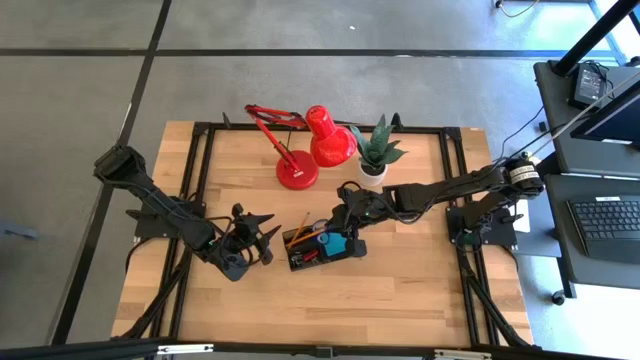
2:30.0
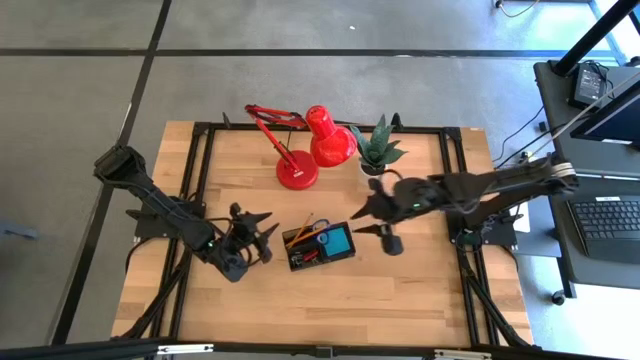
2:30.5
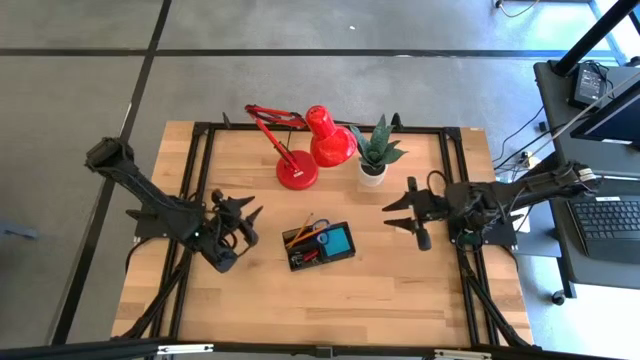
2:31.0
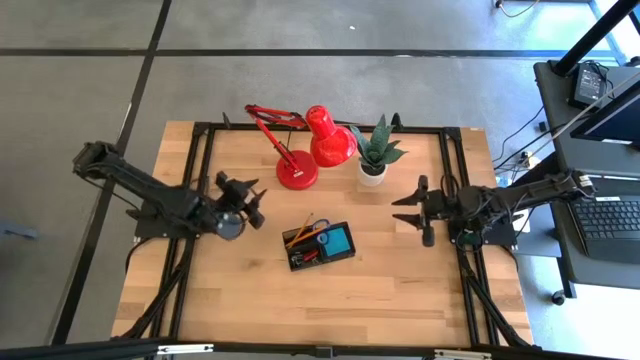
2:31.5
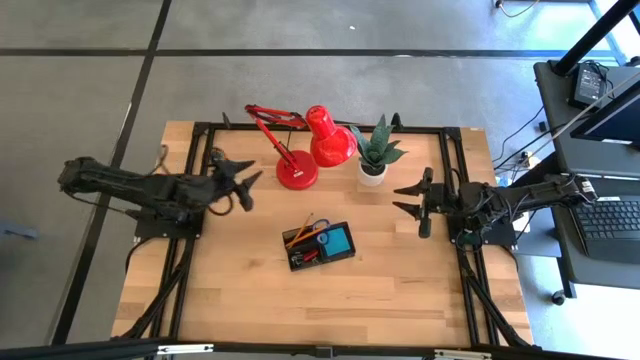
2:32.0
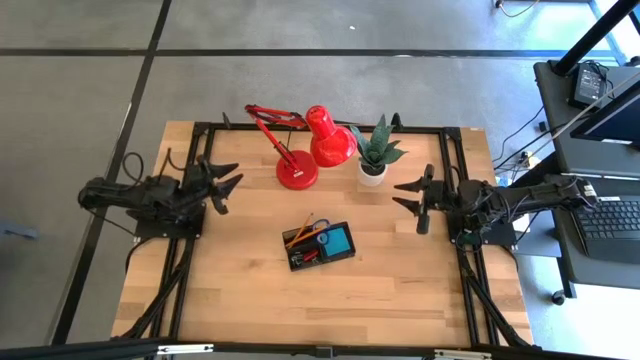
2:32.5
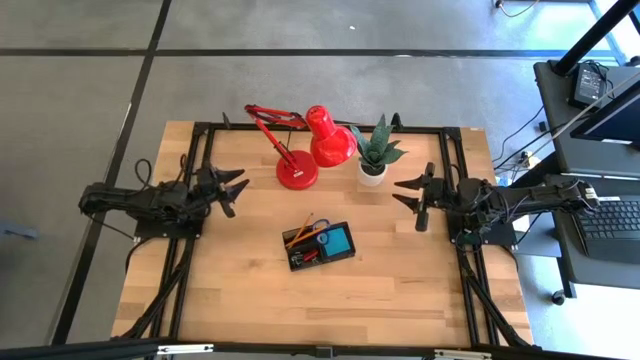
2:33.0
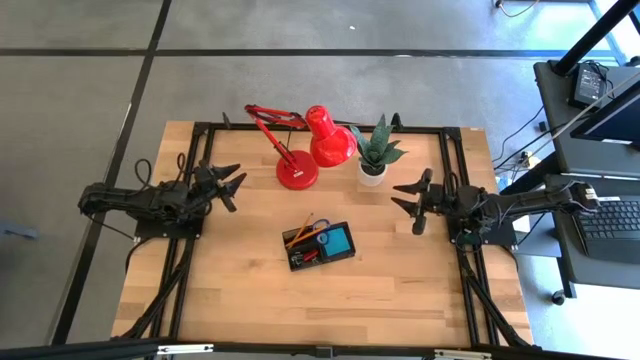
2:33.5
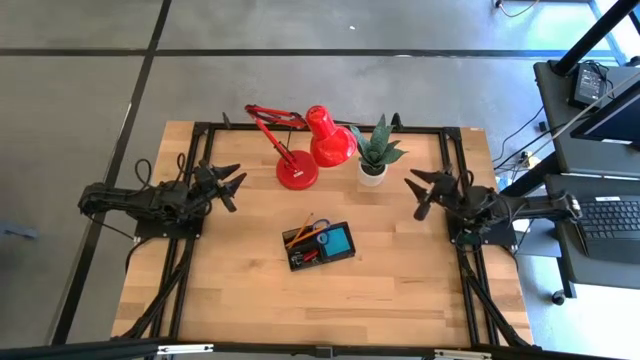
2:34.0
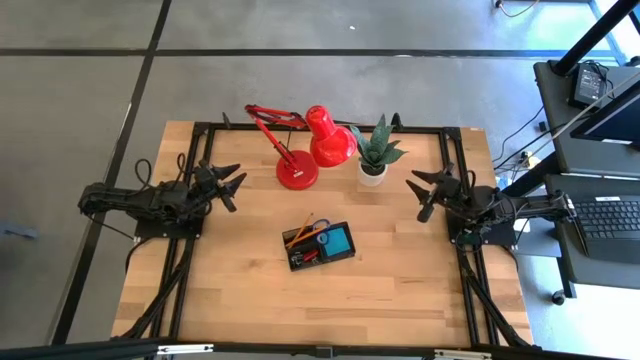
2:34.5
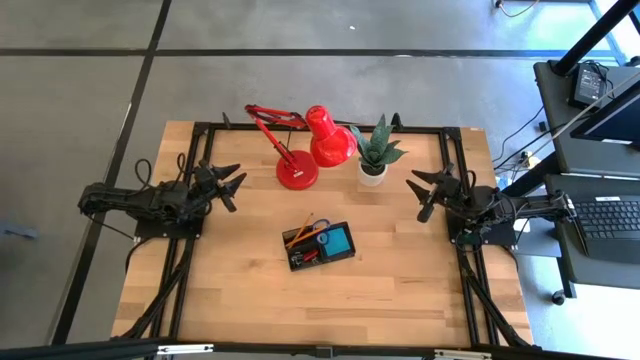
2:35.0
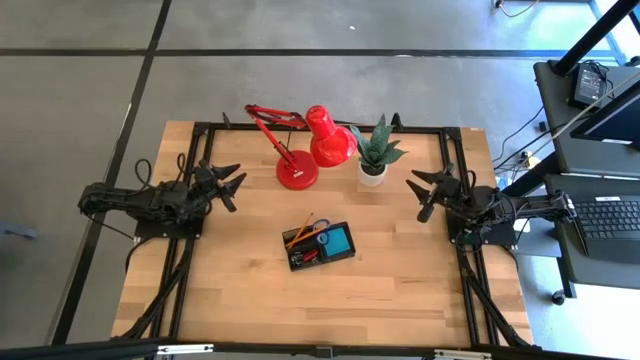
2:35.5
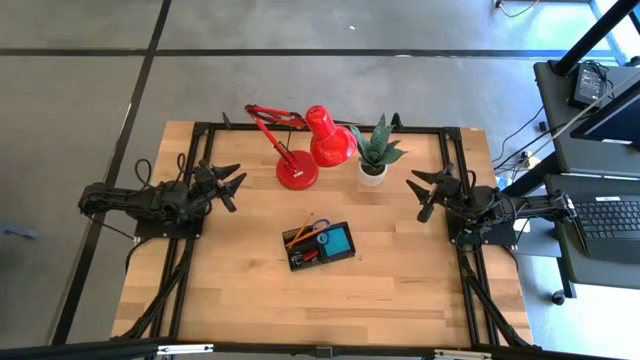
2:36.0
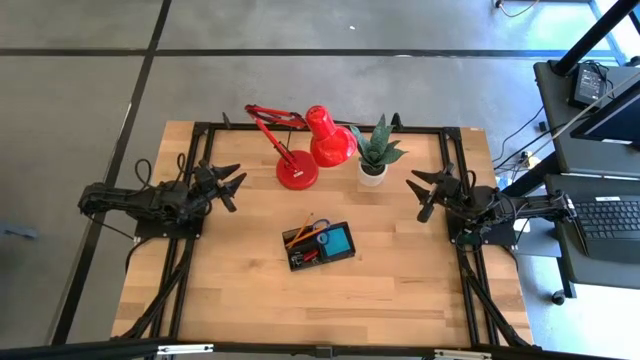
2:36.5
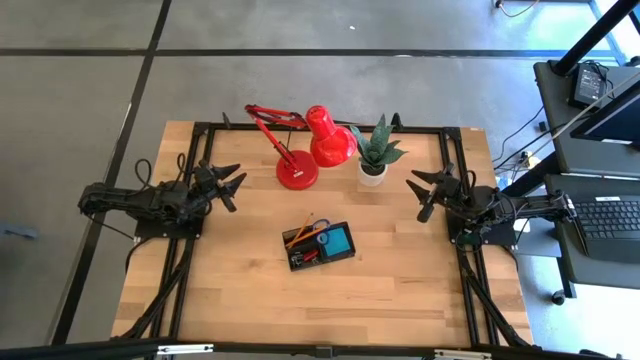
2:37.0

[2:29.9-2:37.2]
Task: Pick and place office supplies into organizer
Return to Home Position

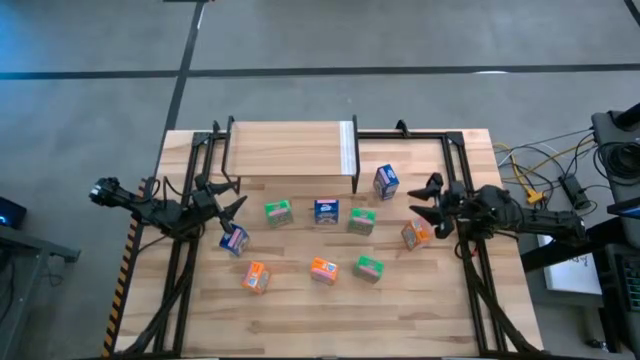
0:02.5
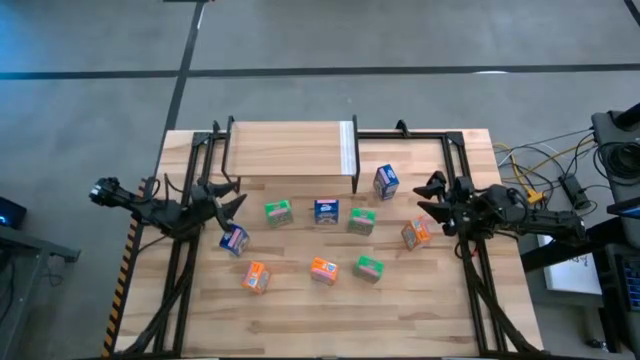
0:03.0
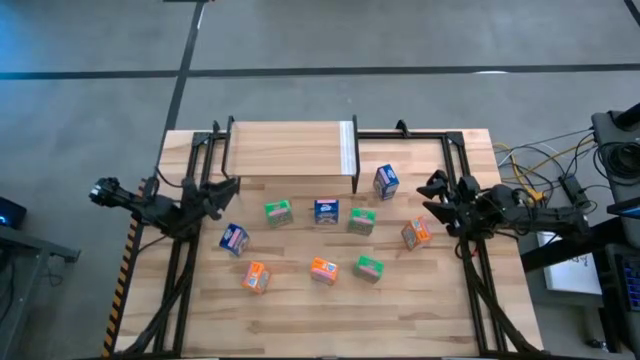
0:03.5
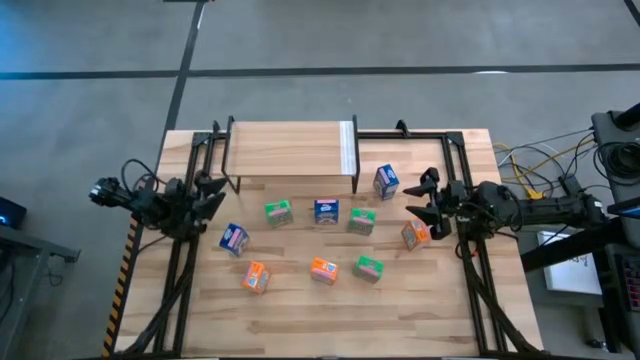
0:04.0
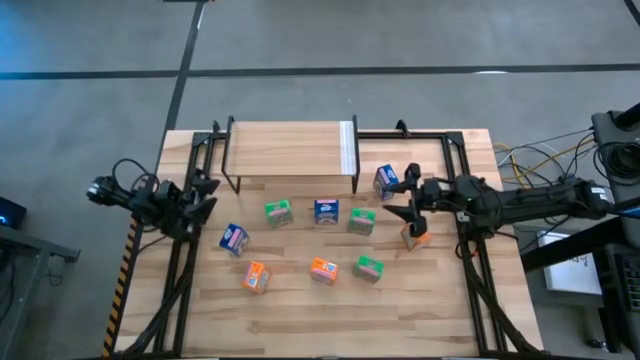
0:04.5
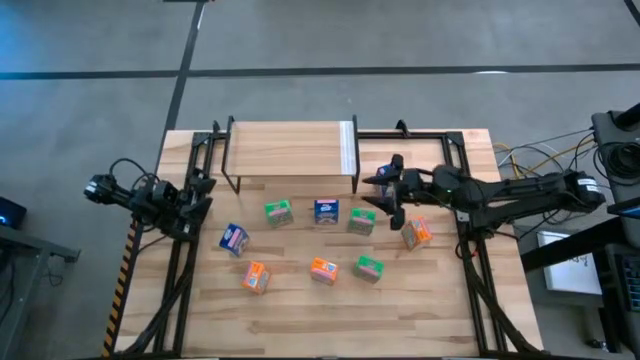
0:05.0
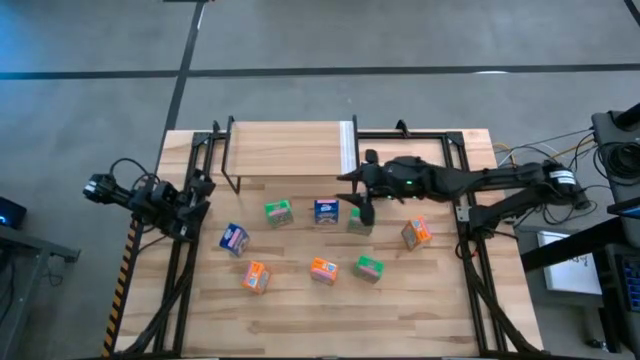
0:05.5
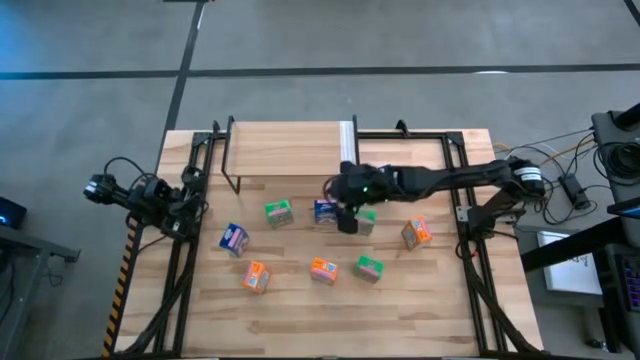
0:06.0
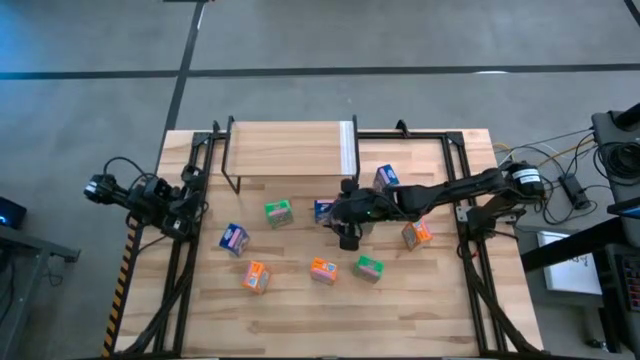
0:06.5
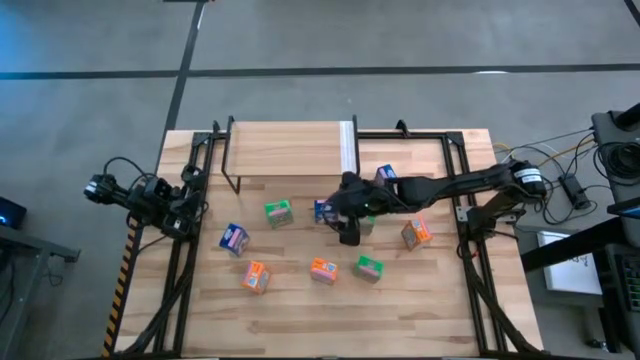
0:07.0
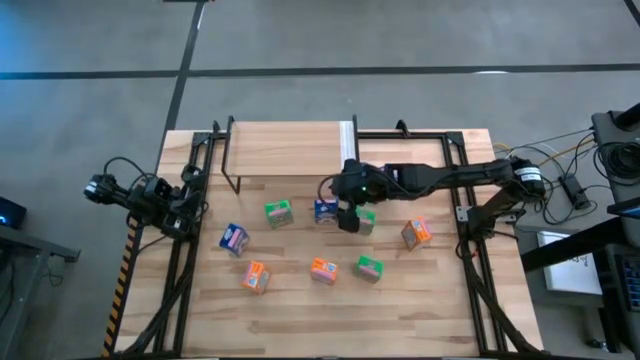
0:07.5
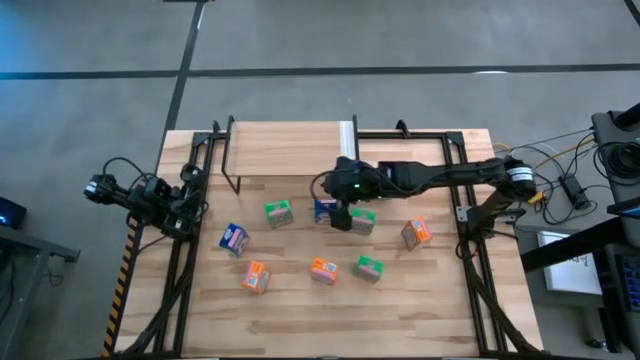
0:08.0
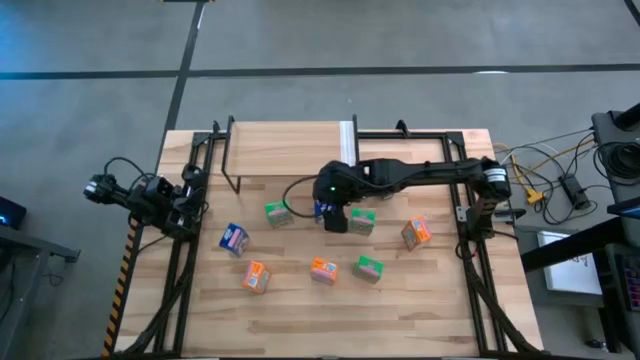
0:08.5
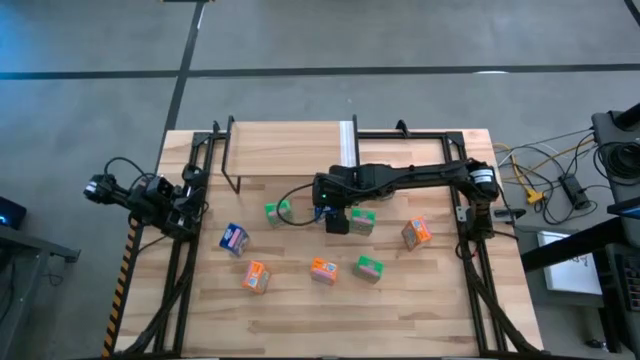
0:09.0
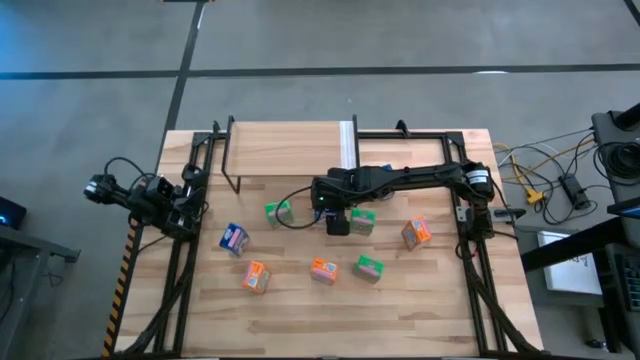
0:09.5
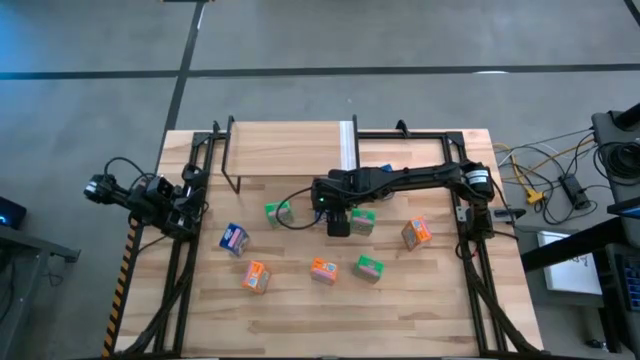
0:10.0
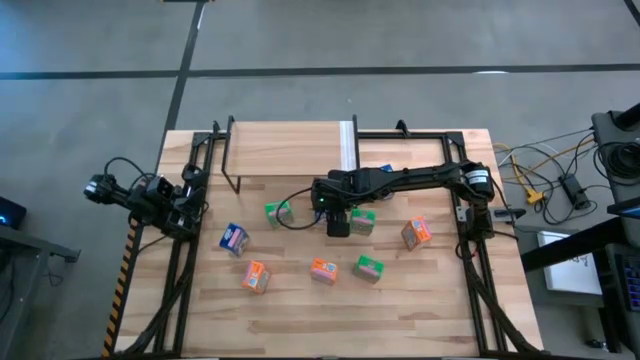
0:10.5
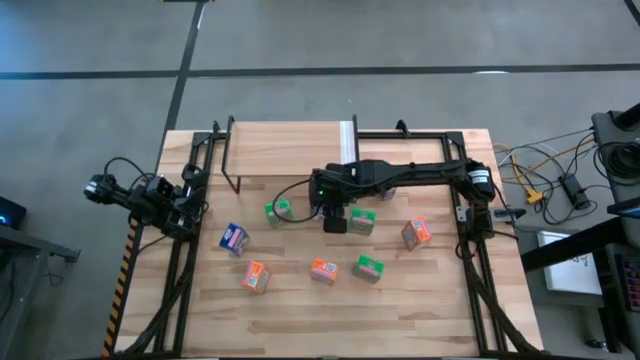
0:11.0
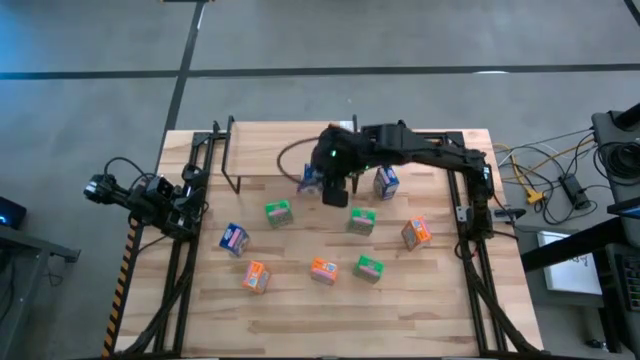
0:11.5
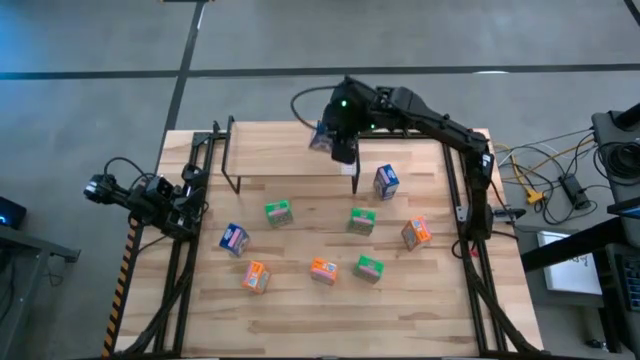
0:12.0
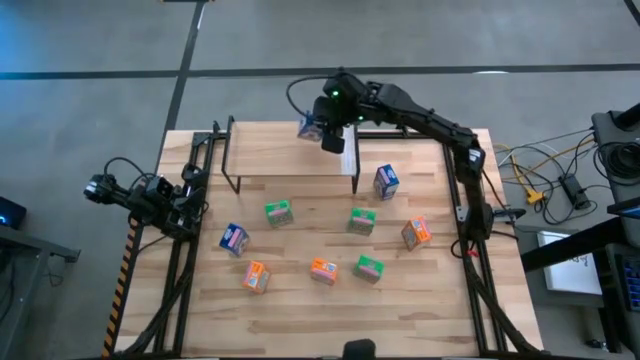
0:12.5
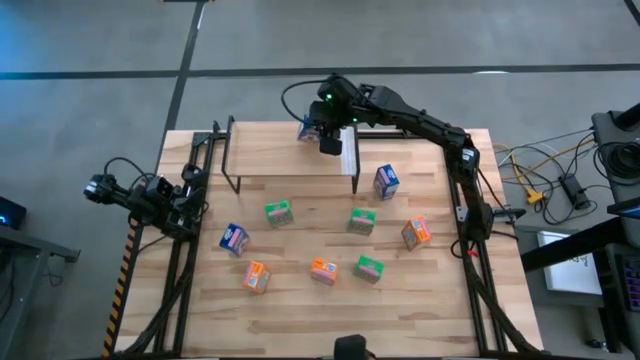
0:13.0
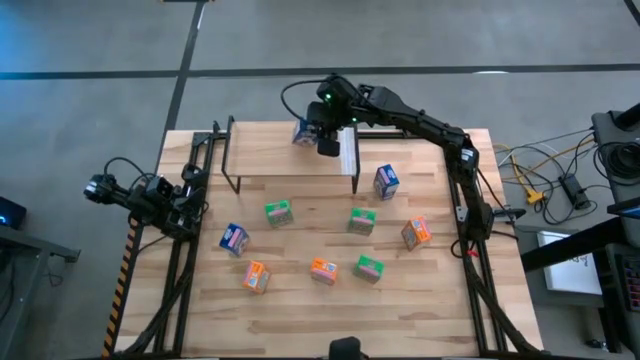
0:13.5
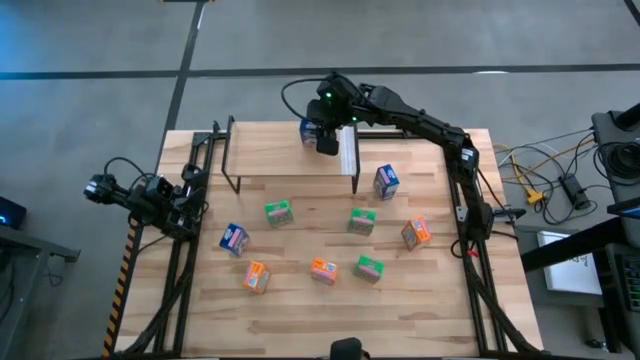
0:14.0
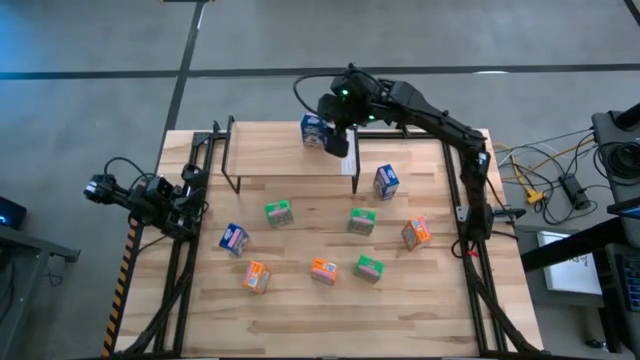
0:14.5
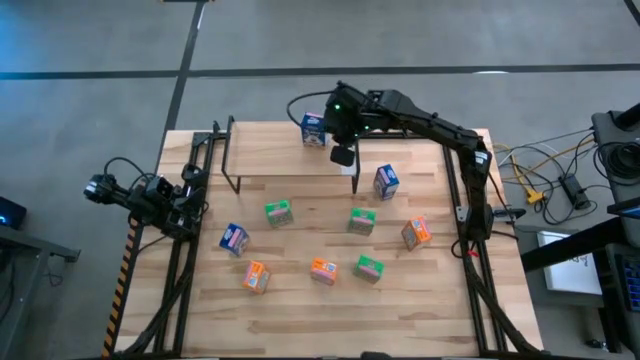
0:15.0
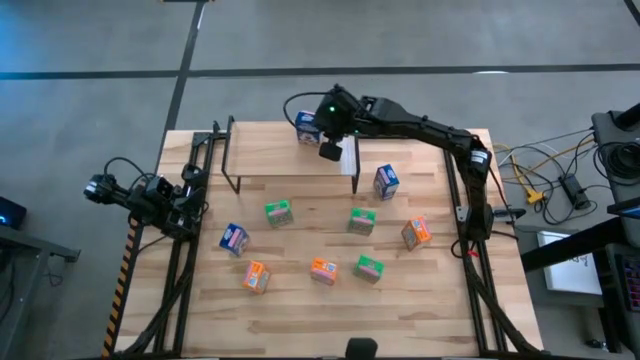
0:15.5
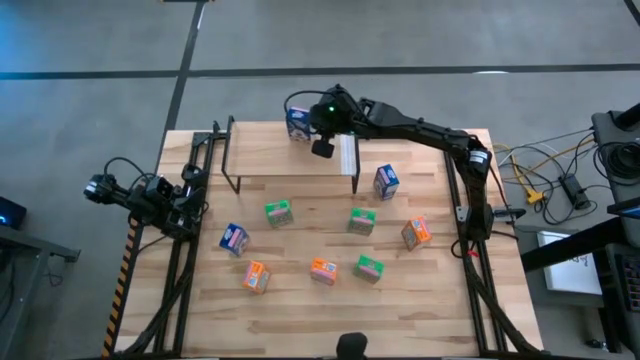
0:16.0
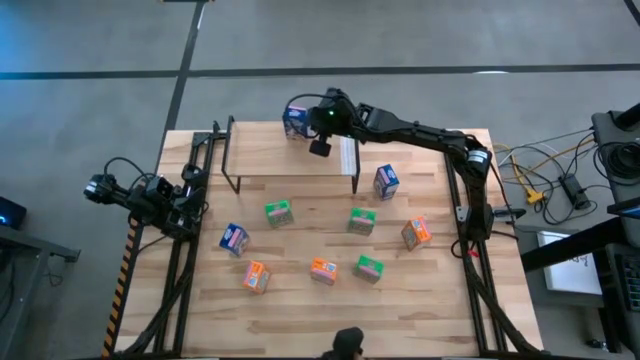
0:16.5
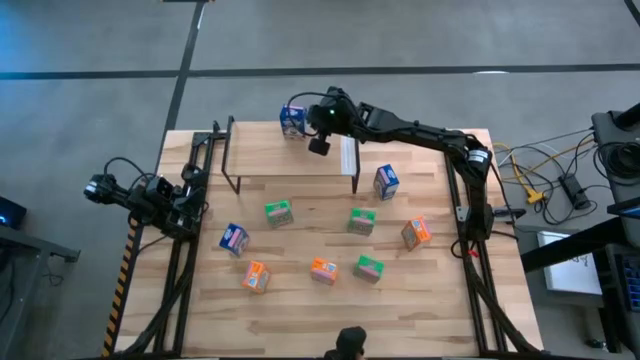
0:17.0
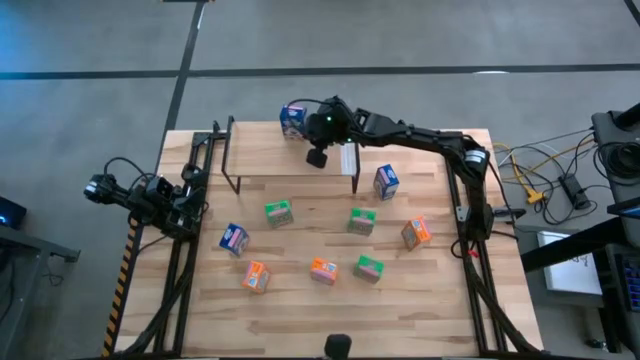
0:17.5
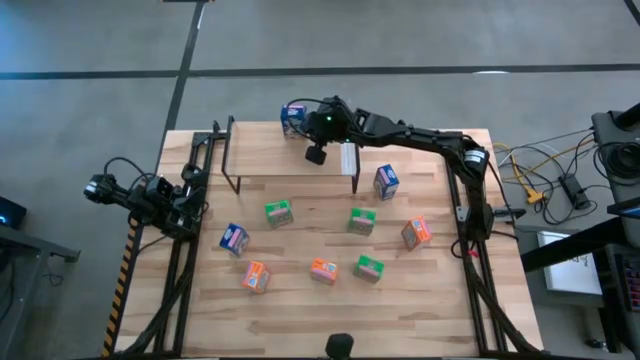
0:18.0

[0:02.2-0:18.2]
Task: Stack cereal on shelf
Put the center blue cereal box on the shelf
